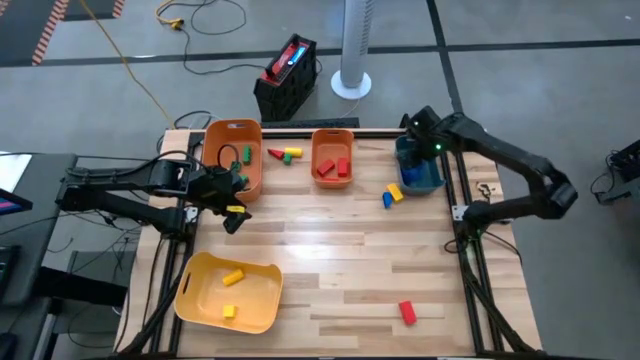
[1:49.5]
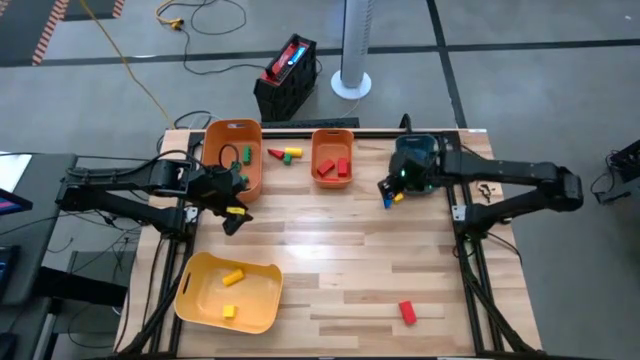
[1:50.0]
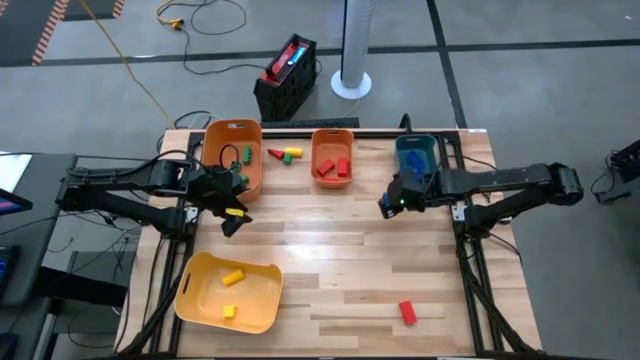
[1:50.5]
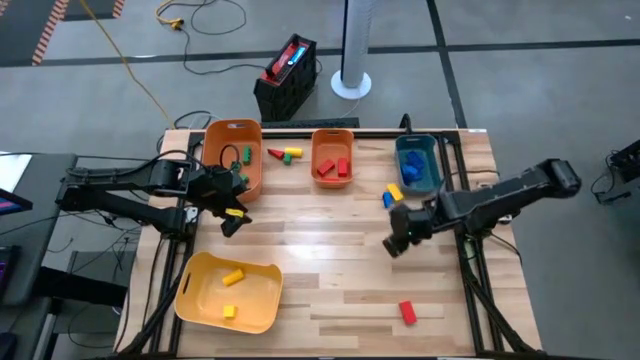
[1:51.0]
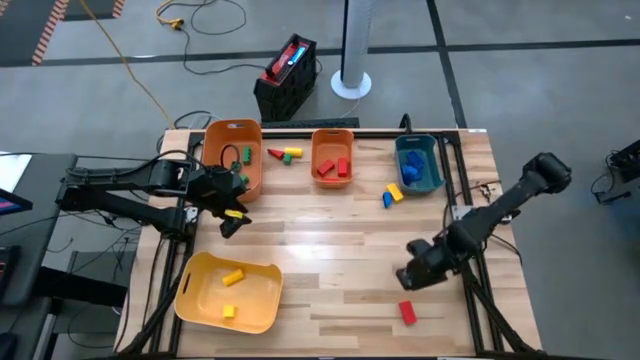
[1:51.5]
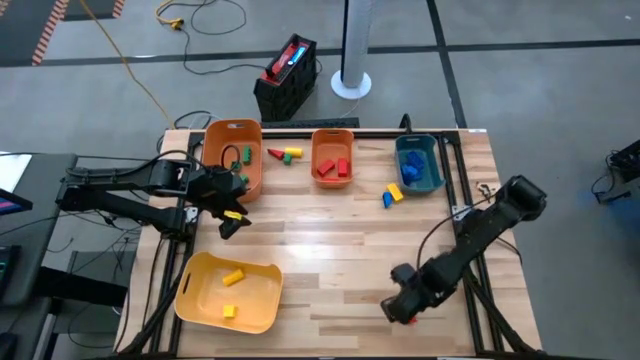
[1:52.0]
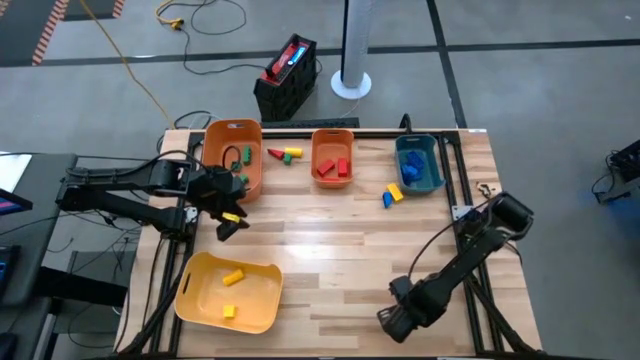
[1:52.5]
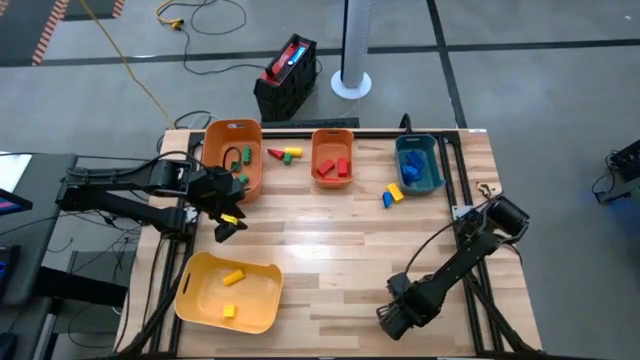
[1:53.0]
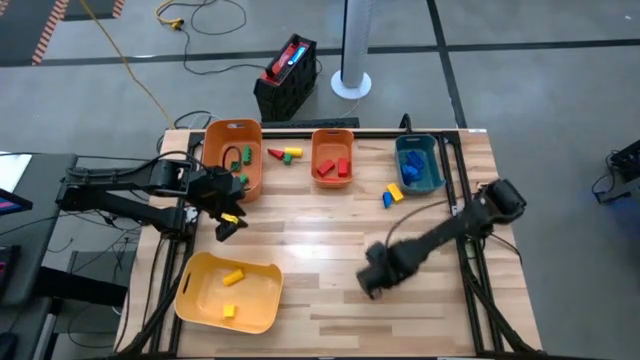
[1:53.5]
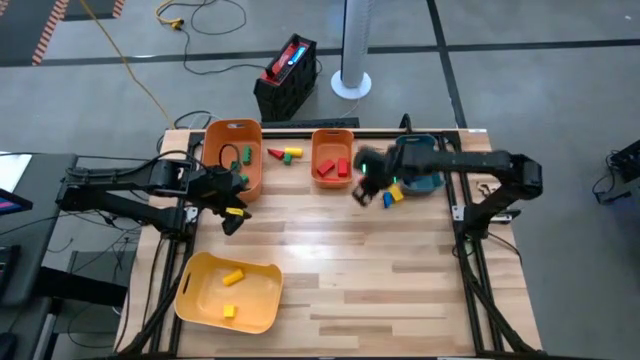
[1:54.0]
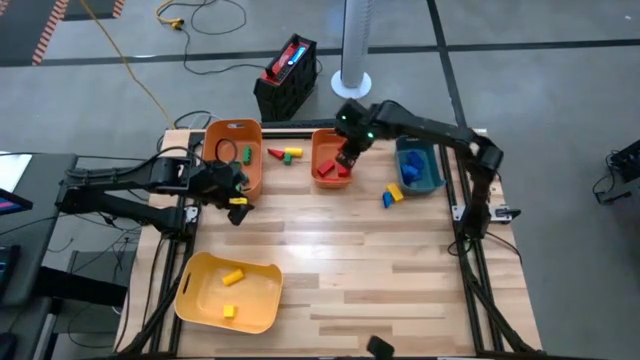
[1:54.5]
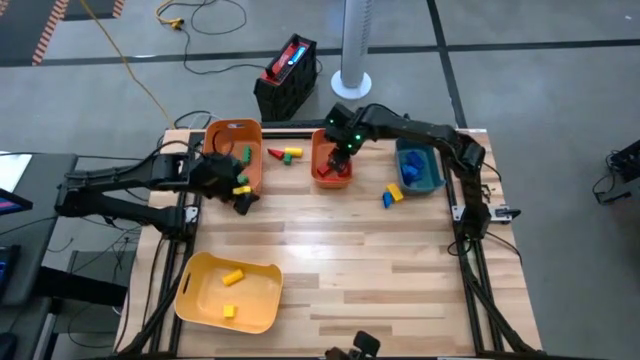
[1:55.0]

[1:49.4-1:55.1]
Task: Sort blocks
Put the red block into the right orange bin

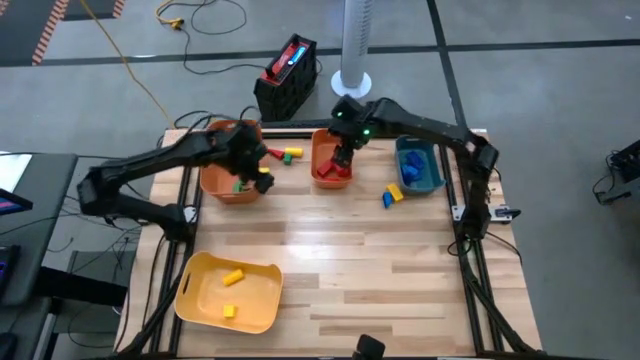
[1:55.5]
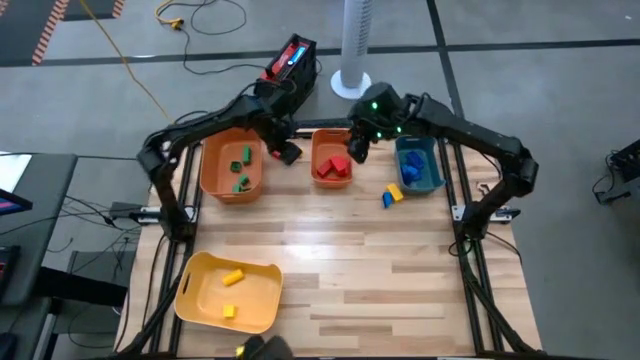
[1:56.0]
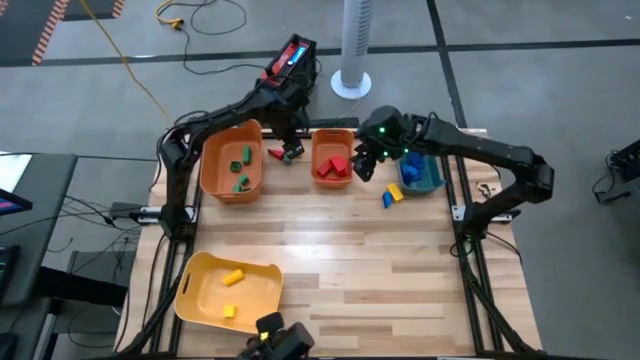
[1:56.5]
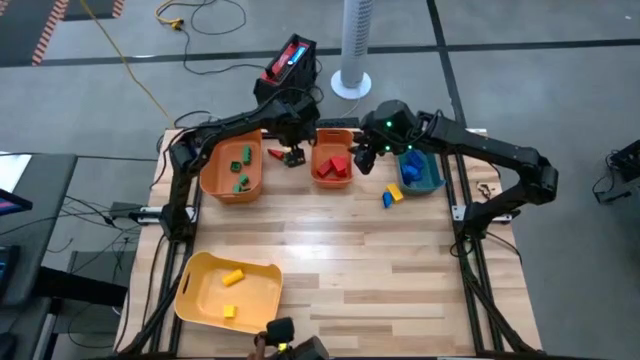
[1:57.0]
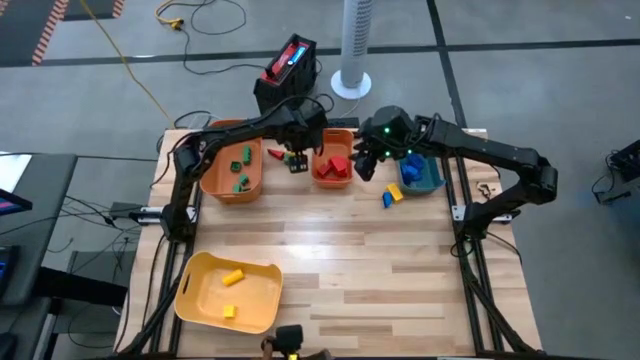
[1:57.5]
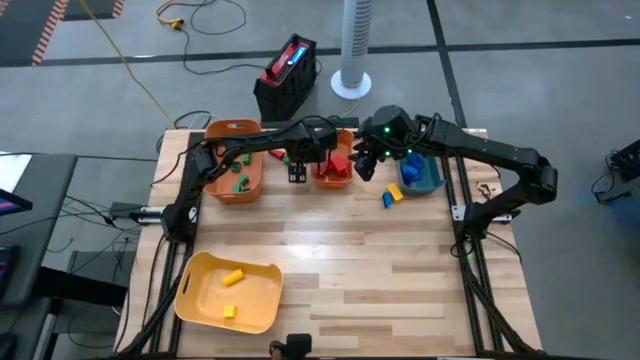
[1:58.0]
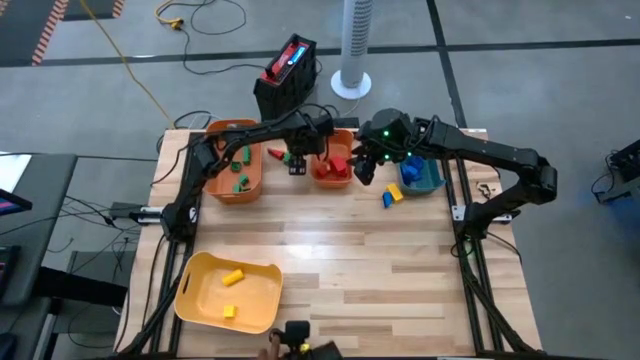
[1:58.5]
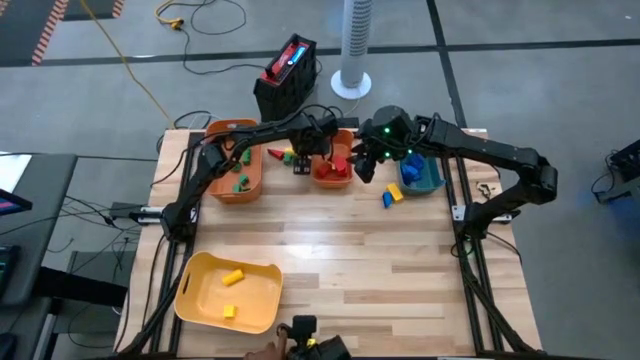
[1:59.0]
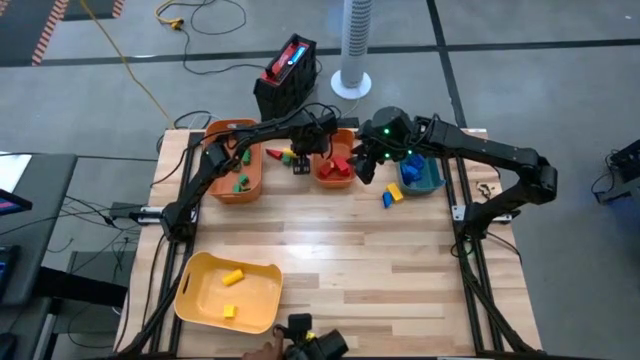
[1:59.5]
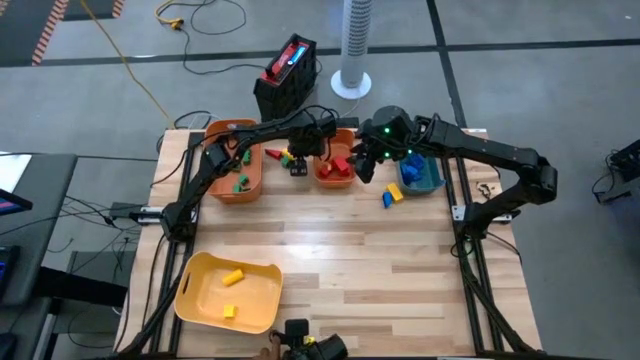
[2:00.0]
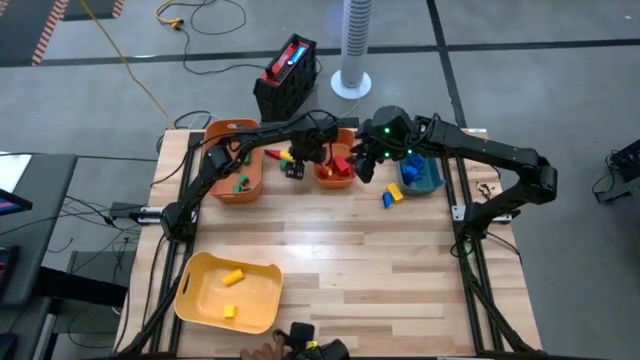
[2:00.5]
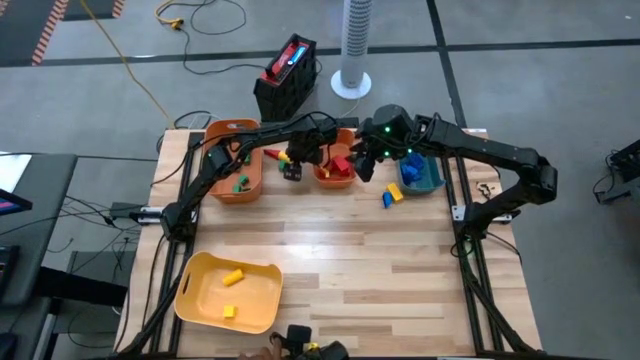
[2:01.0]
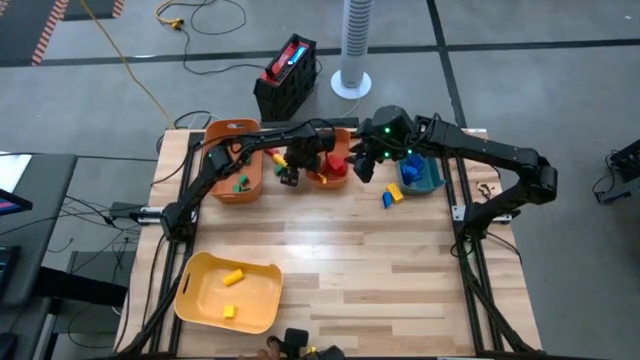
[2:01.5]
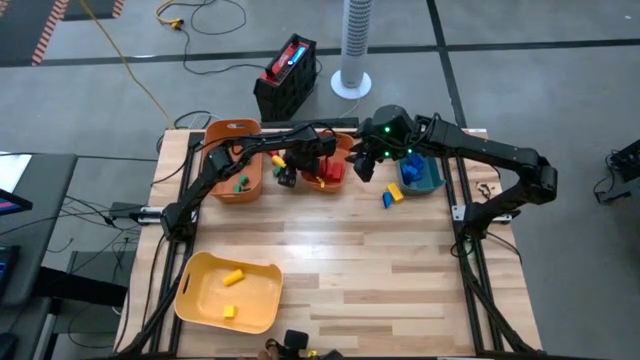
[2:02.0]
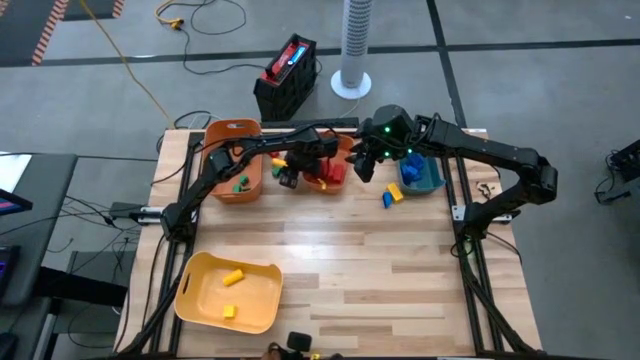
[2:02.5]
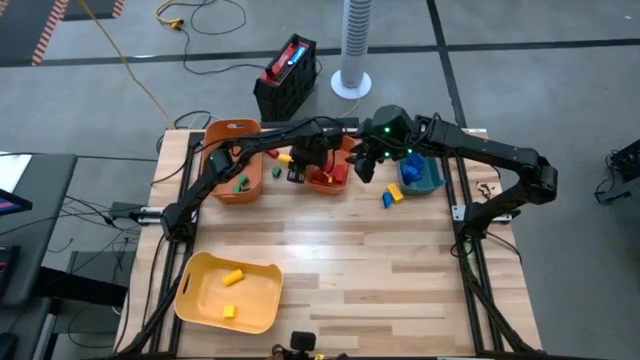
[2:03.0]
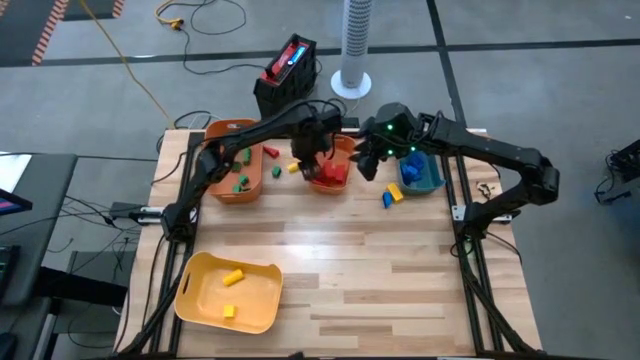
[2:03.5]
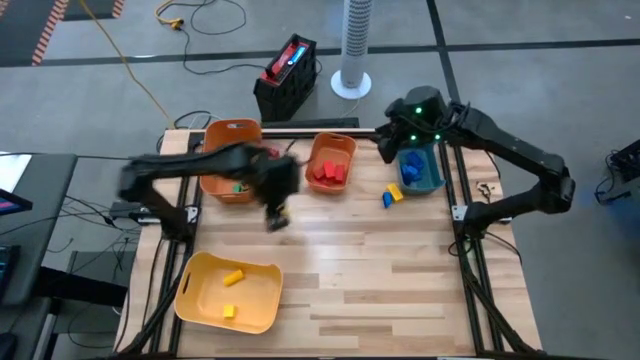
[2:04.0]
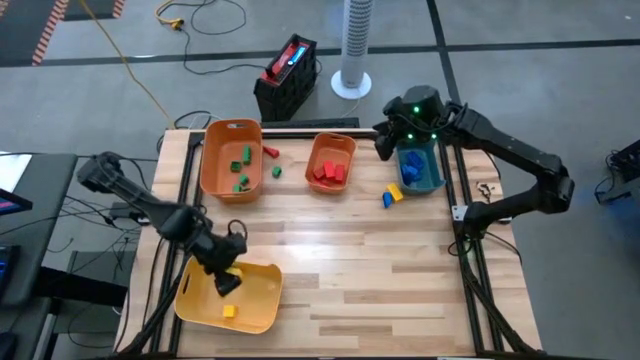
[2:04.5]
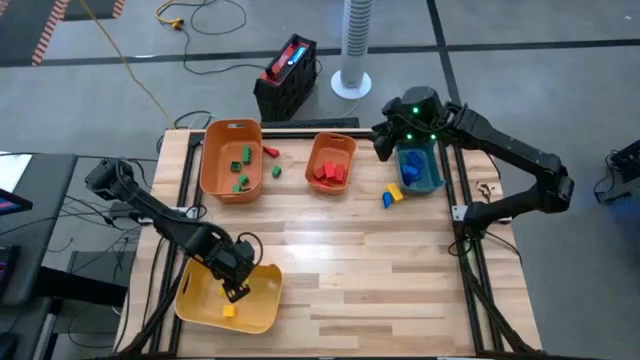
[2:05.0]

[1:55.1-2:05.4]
Put the yellow block into the yellow bin

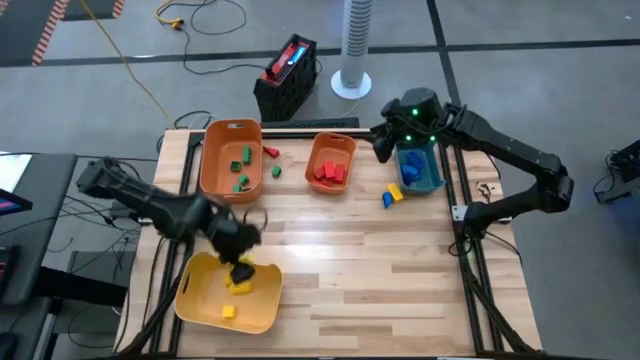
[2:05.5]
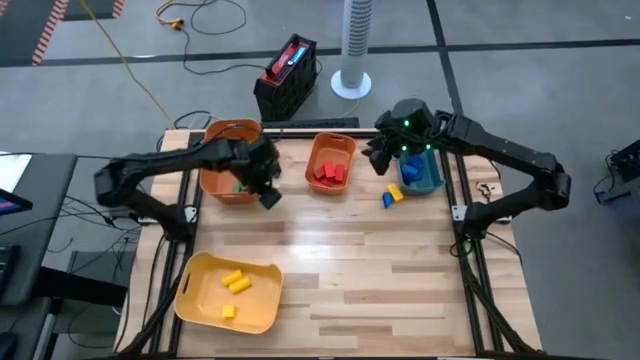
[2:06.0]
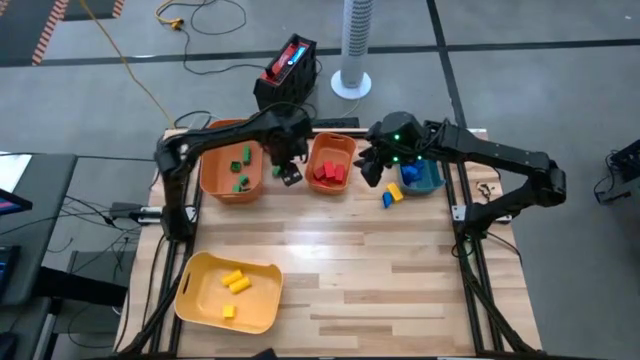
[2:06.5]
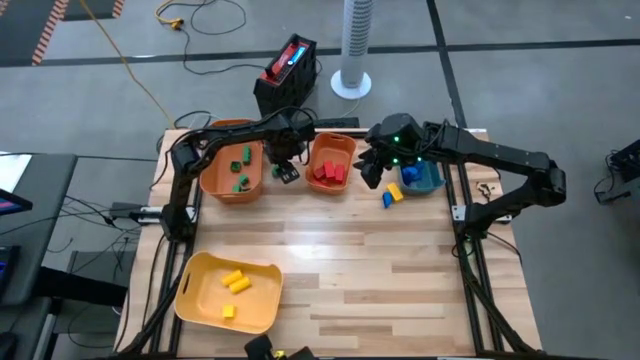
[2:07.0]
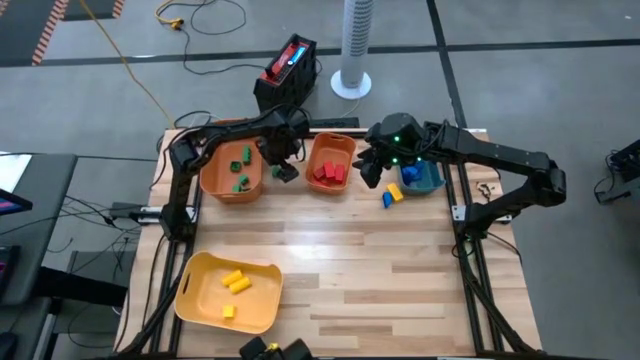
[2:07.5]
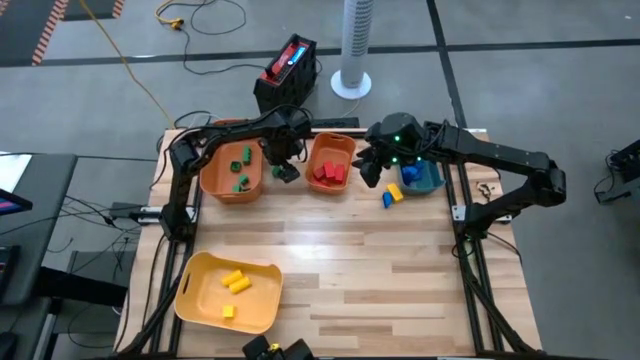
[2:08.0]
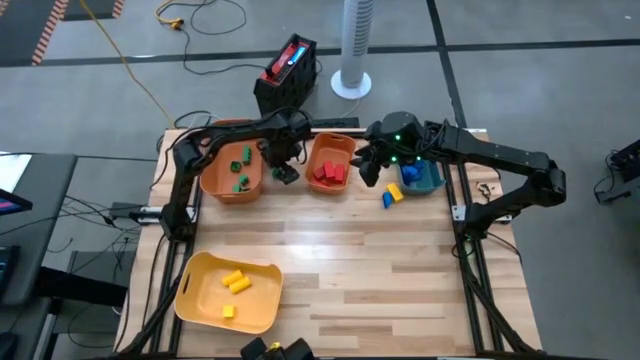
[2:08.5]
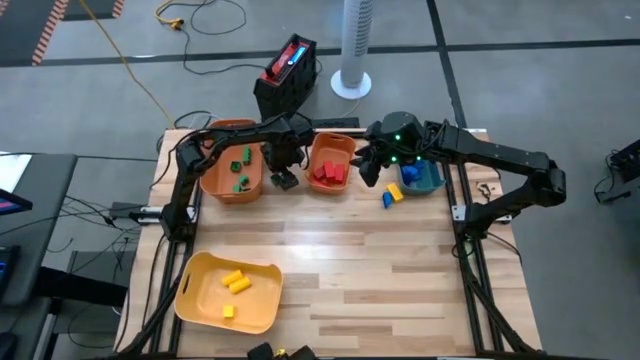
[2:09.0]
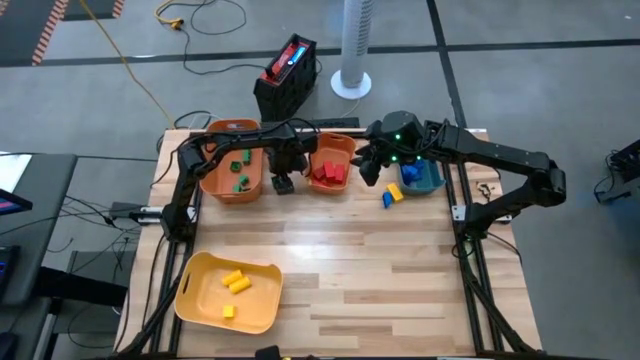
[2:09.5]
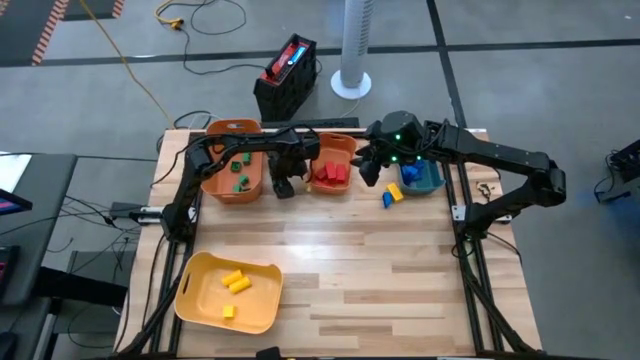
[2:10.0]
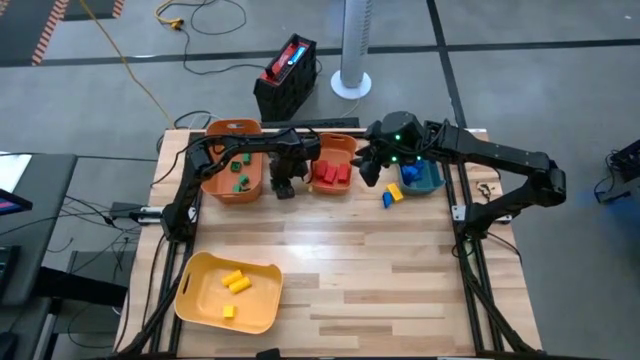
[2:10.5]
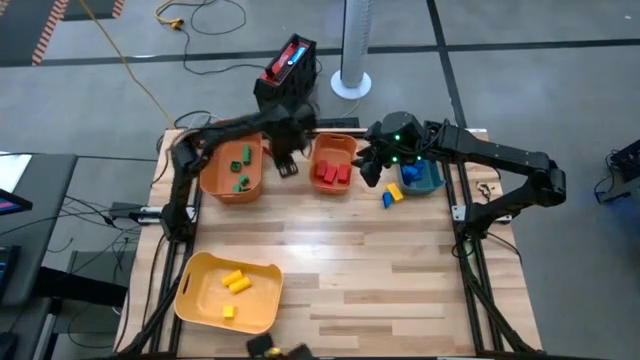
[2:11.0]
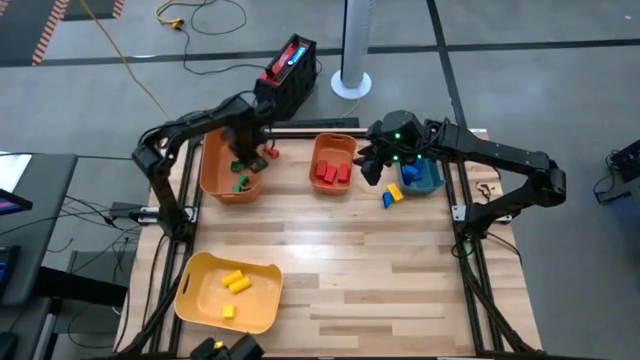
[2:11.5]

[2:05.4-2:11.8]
Put the green game piece into the left orange bin
